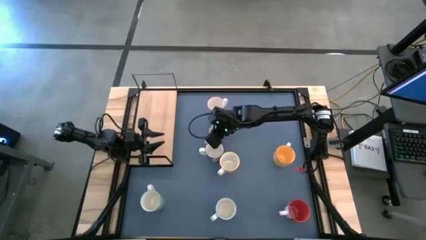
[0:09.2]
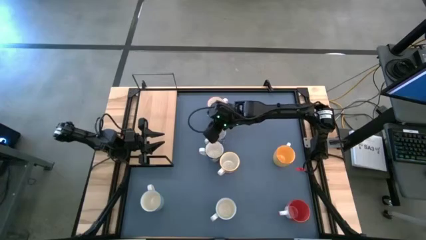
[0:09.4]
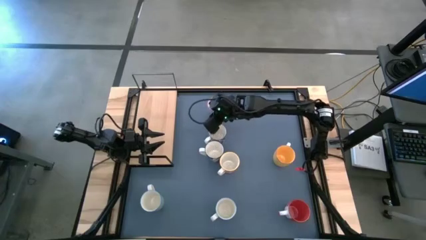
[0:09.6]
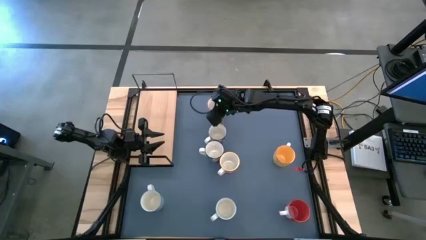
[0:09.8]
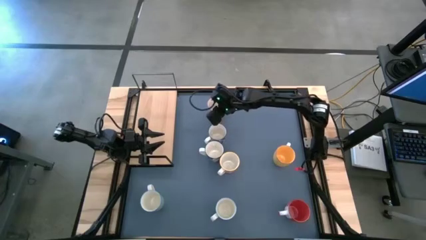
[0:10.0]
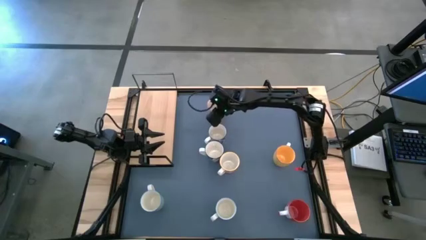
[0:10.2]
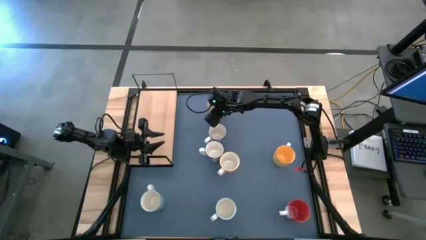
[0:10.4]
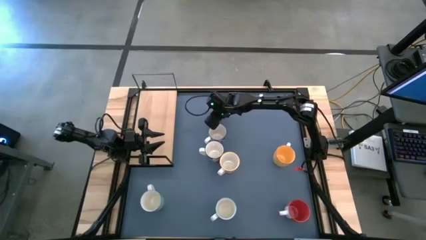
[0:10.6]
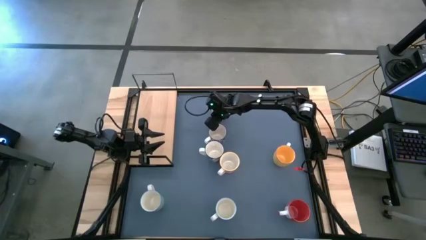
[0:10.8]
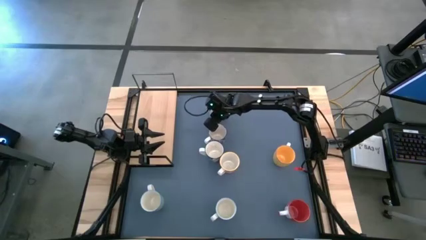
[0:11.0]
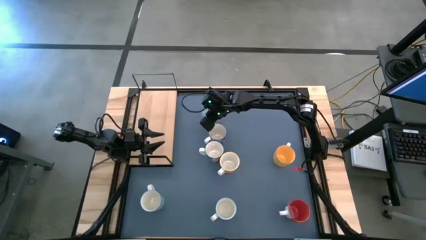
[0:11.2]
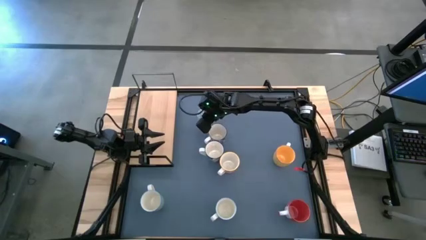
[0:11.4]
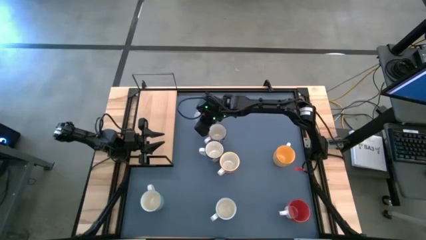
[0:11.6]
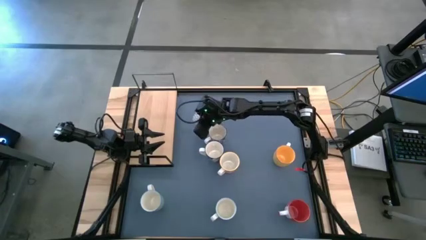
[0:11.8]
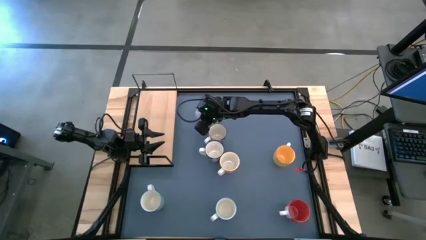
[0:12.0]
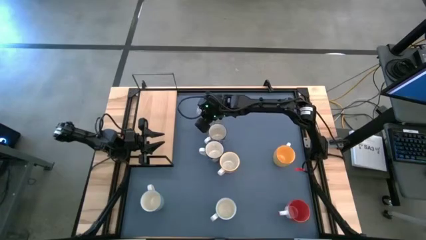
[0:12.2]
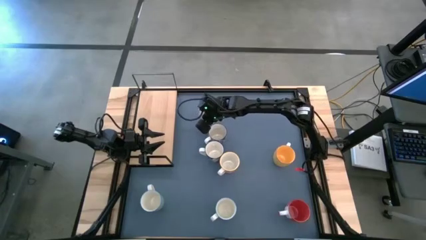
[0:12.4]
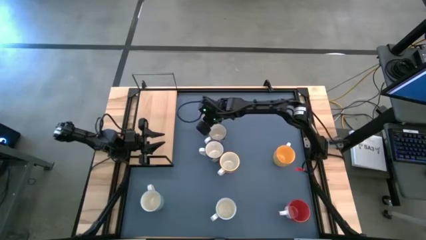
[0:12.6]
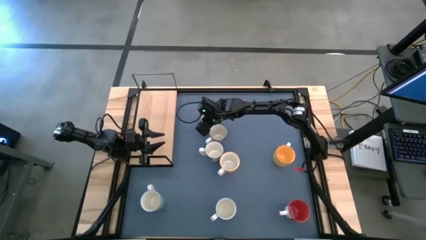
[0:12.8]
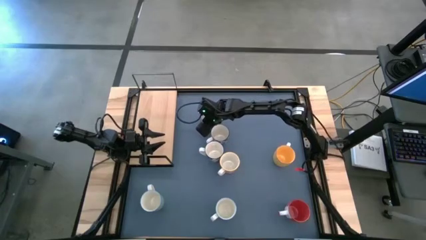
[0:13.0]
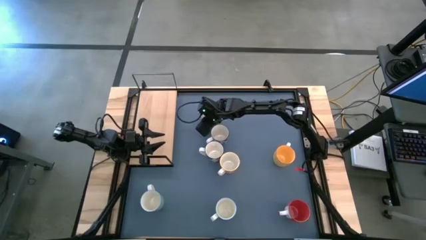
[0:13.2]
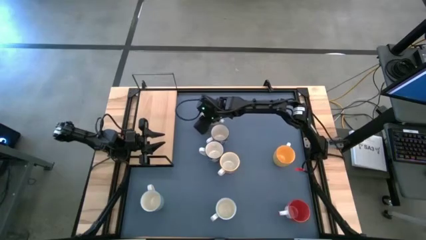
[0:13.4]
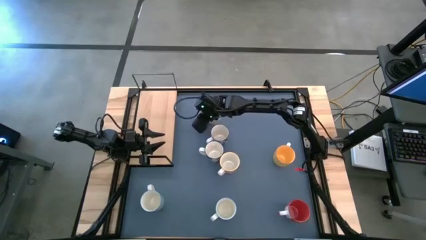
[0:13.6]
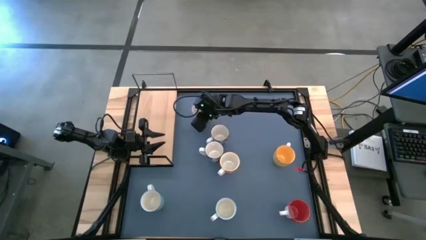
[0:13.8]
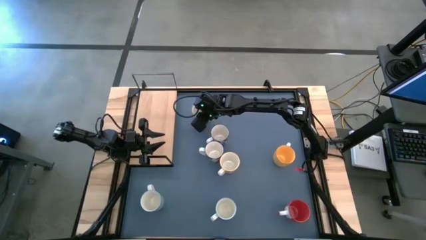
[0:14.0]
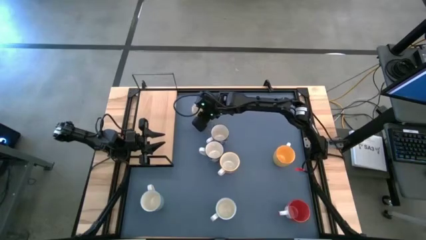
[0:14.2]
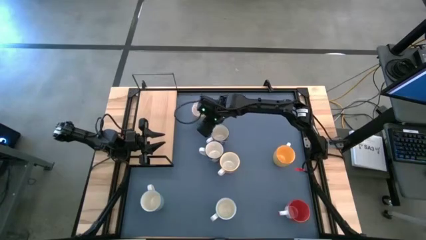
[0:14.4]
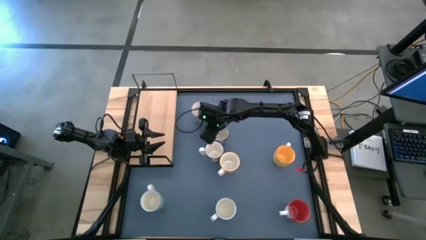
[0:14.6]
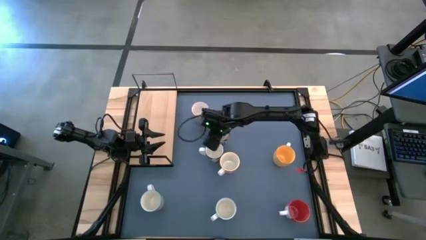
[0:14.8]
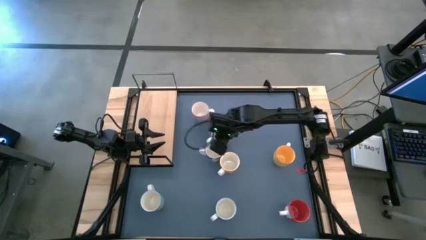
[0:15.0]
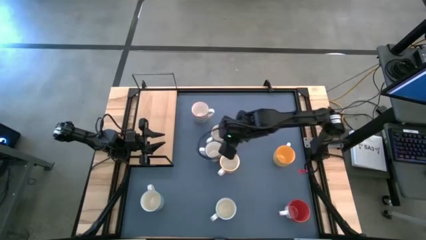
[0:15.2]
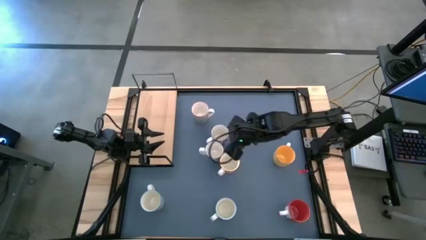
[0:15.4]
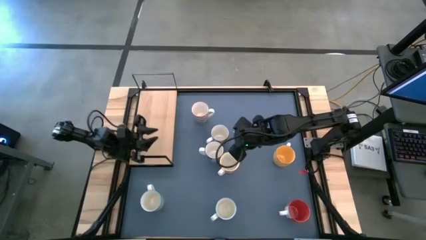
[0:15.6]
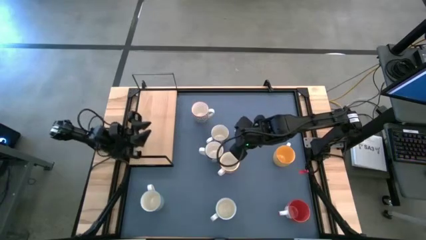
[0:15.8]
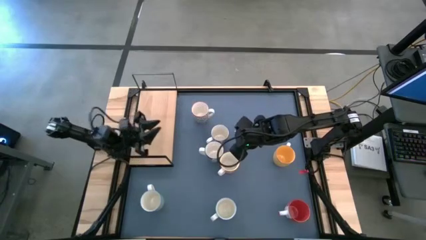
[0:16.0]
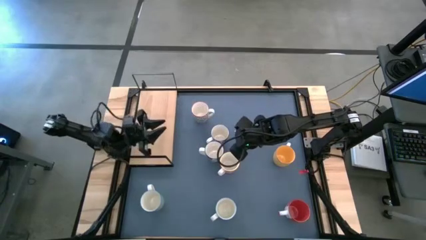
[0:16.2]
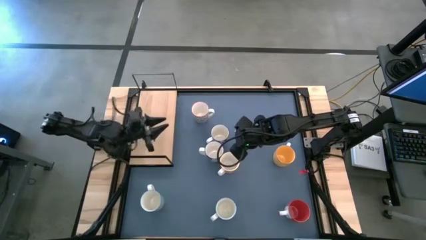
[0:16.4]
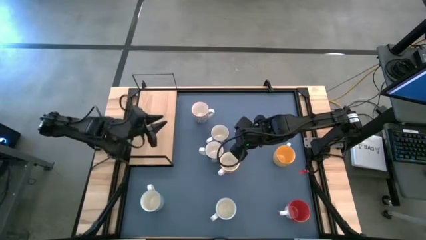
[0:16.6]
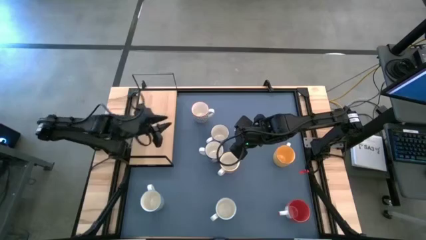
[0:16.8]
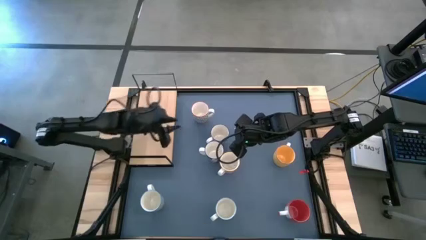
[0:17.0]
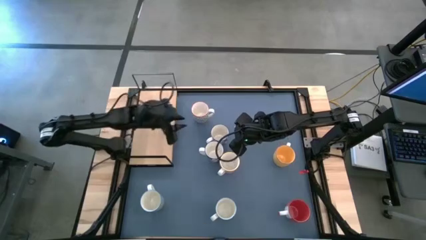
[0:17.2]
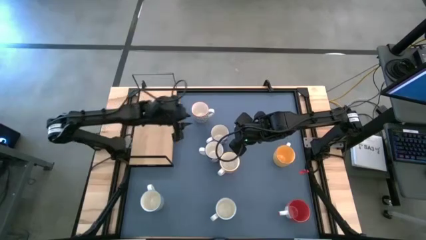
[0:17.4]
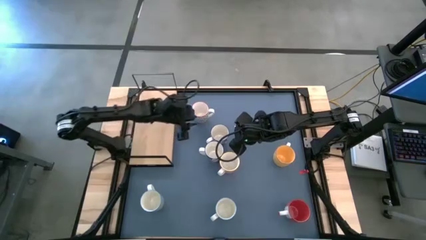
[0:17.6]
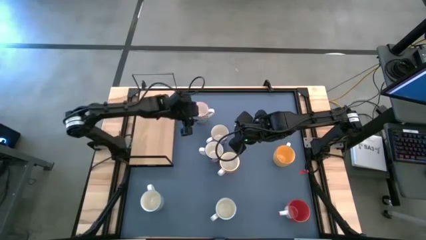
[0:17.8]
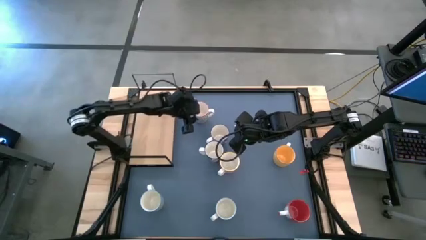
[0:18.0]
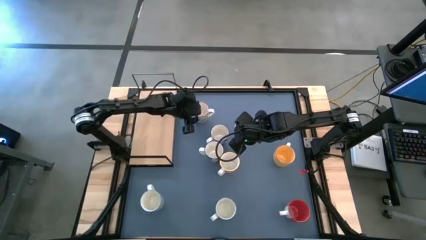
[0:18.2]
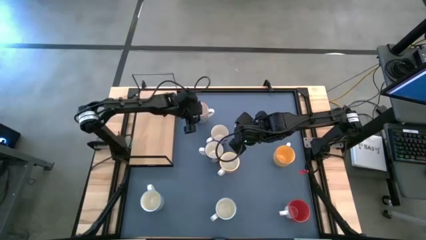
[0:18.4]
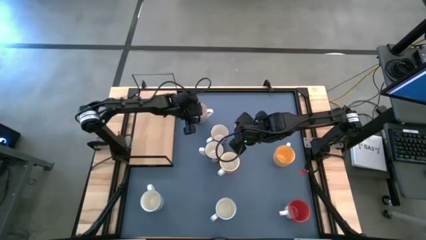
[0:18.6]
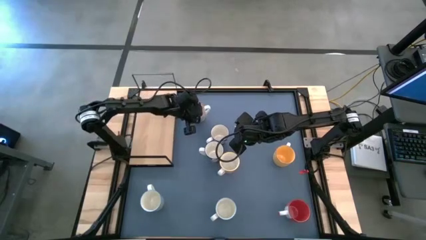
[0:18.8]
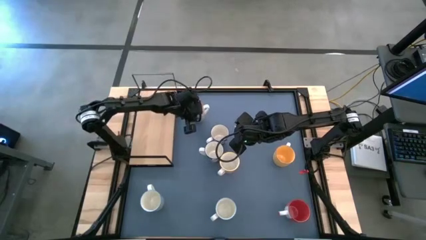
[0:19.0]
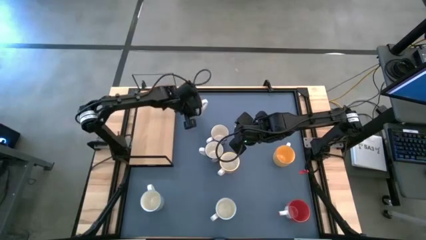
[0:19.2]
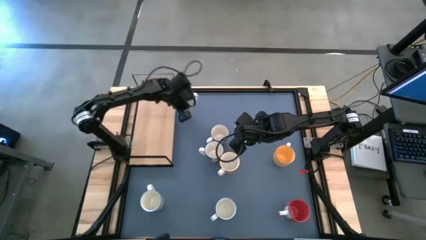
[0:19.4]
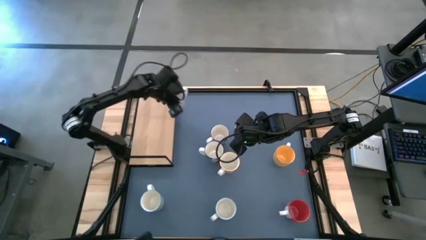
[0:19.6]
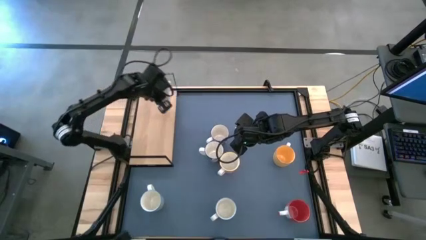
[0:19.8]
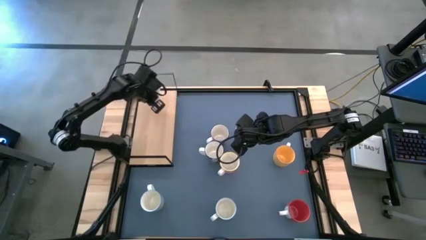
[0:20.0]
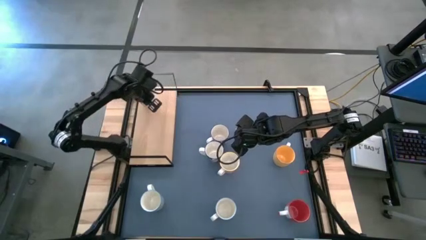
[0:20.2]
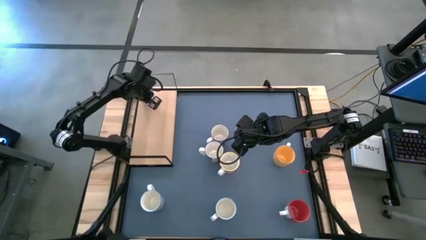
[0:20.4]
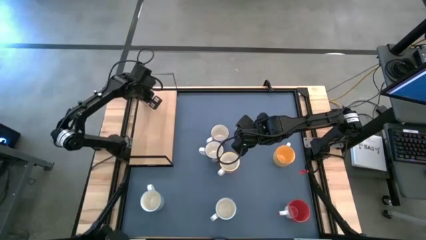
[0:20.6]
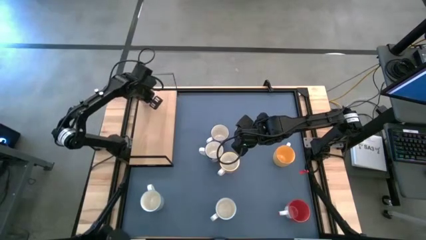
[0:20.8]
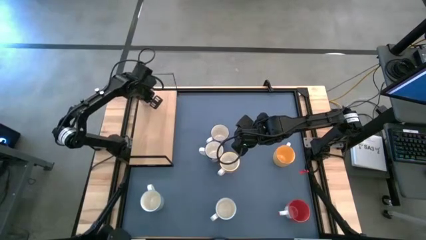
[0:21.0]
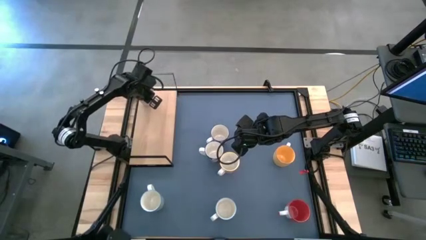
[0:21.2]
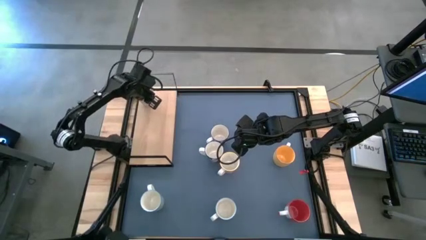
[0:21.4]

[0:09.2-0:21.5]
Task: Place coffee mugs
Put the gray patterned mug on the shelf
